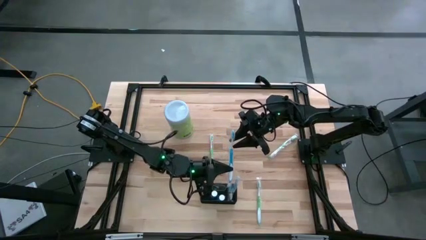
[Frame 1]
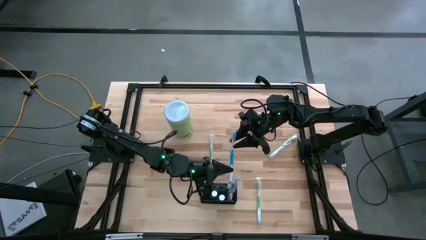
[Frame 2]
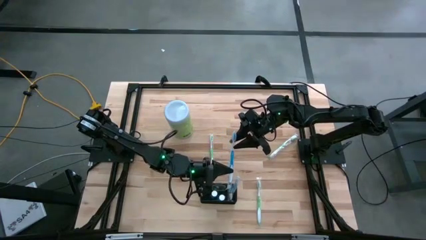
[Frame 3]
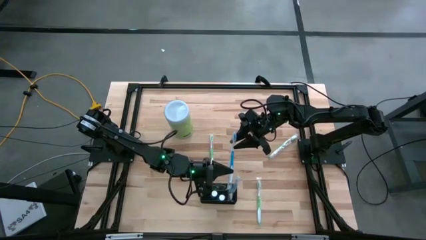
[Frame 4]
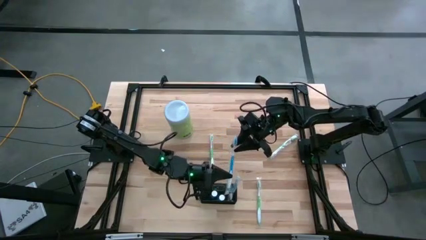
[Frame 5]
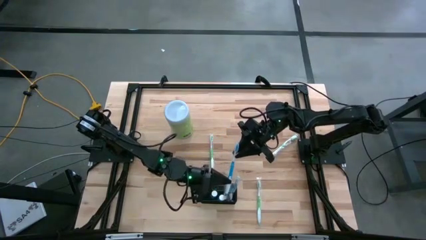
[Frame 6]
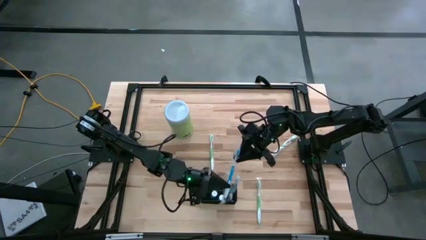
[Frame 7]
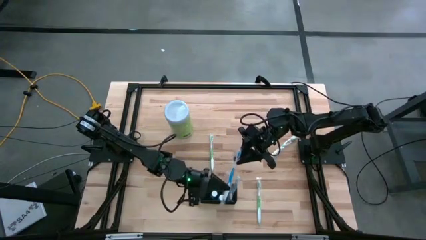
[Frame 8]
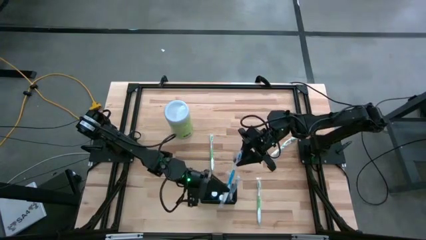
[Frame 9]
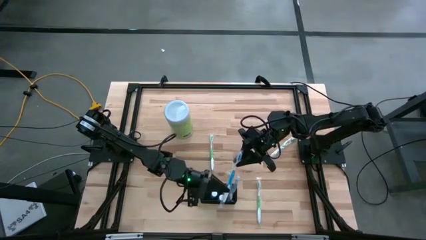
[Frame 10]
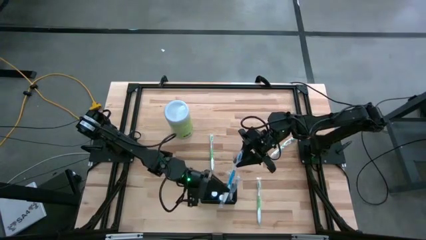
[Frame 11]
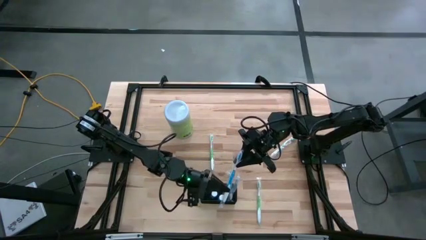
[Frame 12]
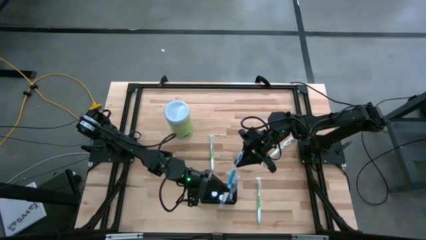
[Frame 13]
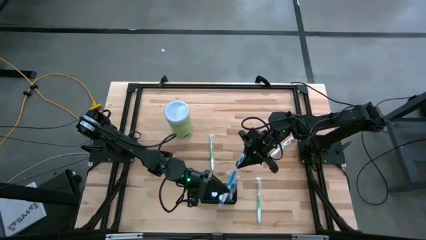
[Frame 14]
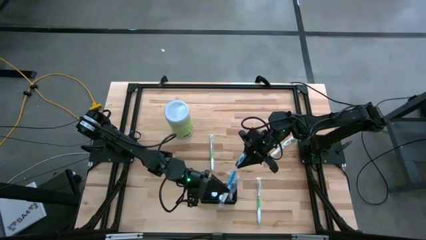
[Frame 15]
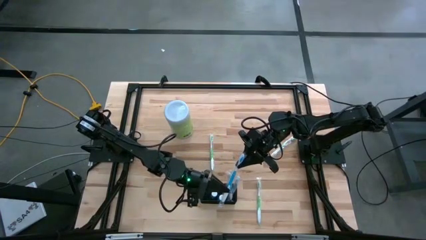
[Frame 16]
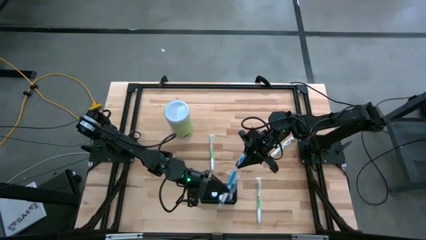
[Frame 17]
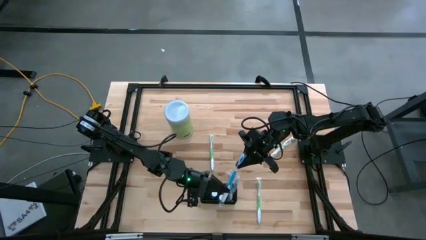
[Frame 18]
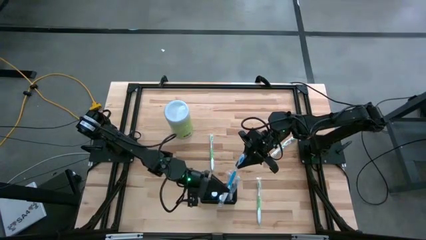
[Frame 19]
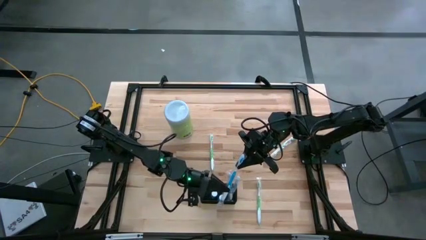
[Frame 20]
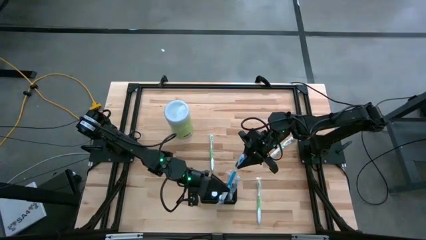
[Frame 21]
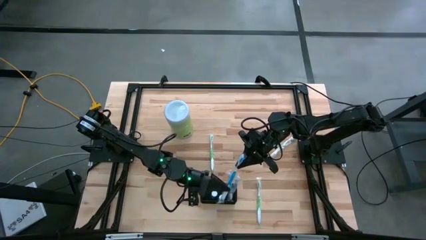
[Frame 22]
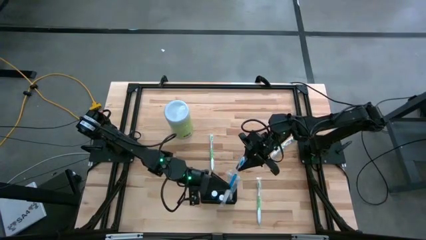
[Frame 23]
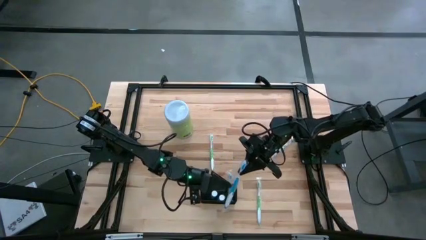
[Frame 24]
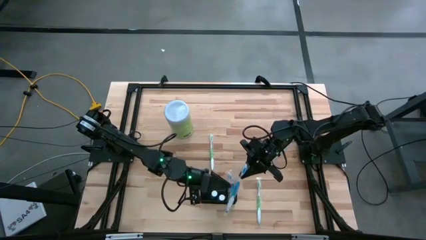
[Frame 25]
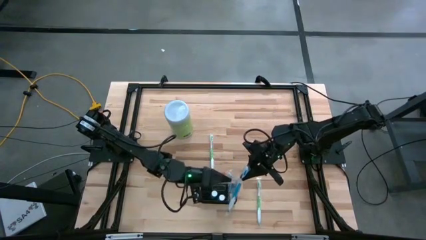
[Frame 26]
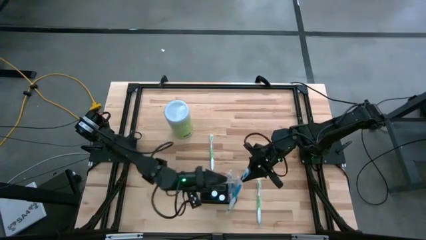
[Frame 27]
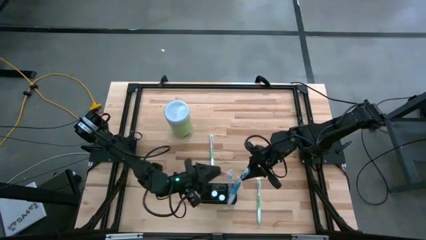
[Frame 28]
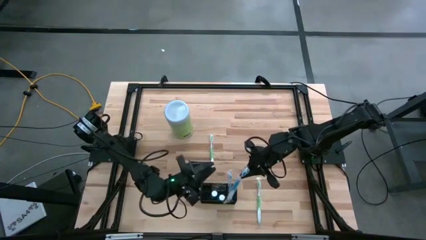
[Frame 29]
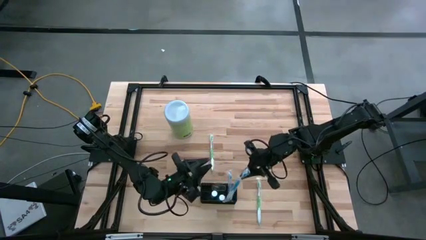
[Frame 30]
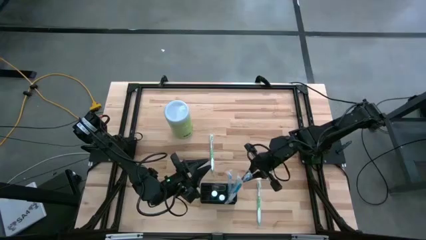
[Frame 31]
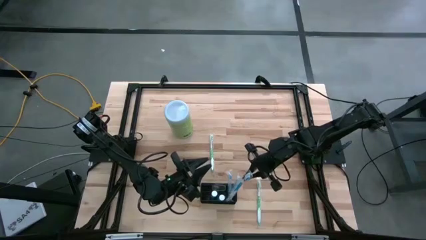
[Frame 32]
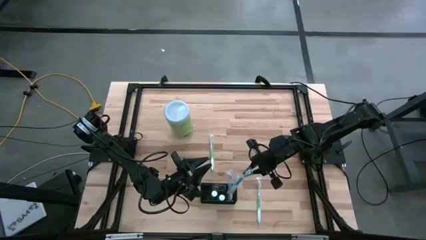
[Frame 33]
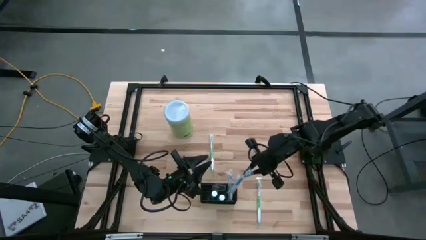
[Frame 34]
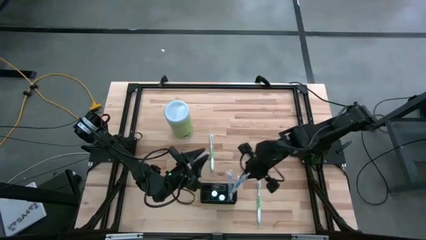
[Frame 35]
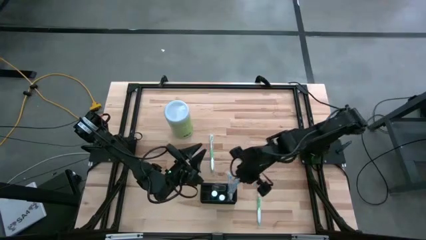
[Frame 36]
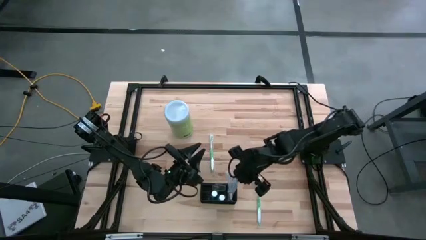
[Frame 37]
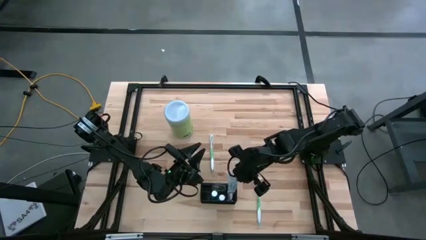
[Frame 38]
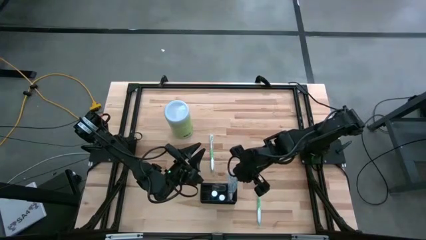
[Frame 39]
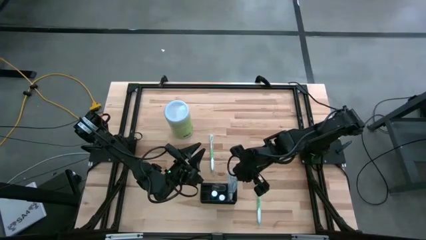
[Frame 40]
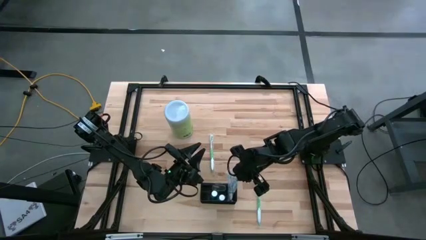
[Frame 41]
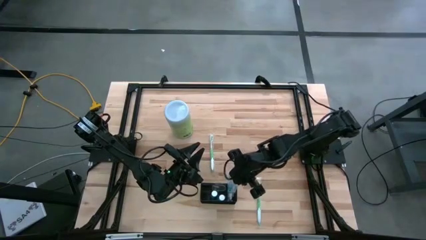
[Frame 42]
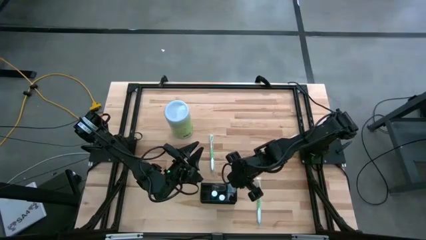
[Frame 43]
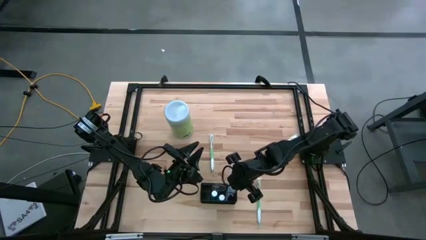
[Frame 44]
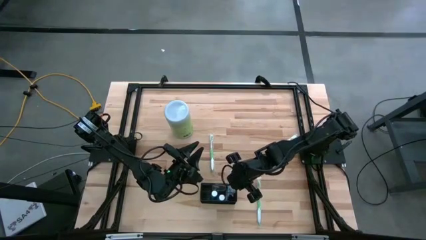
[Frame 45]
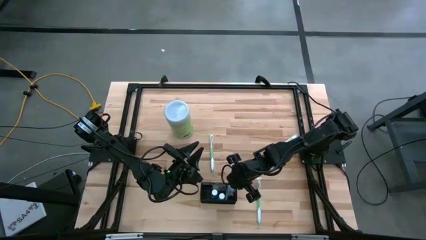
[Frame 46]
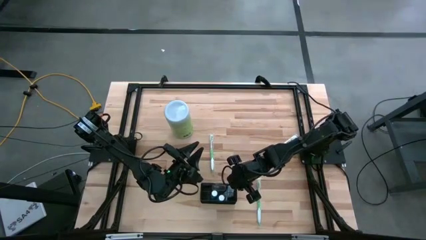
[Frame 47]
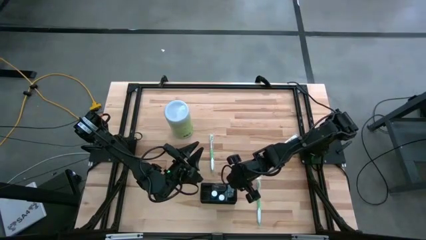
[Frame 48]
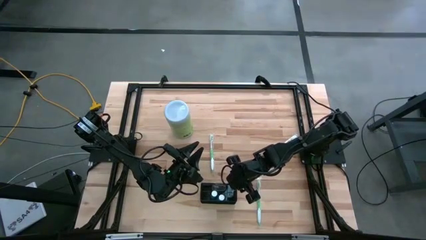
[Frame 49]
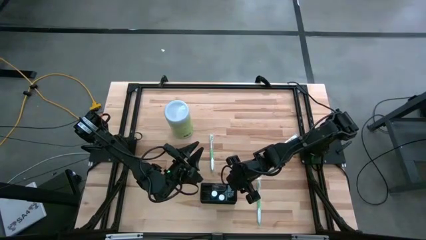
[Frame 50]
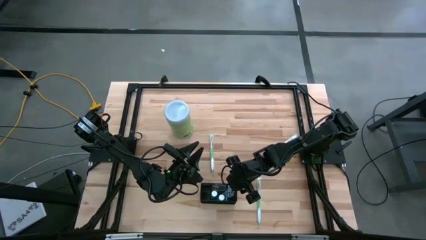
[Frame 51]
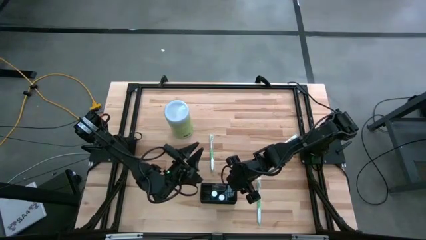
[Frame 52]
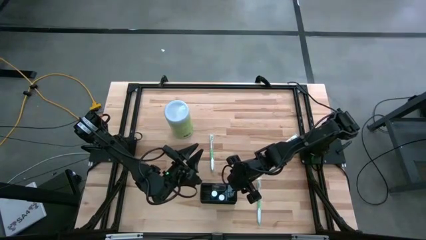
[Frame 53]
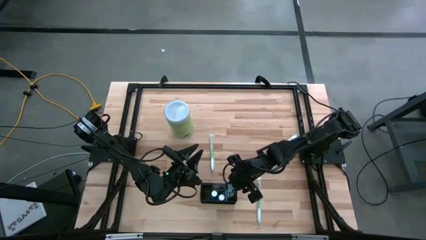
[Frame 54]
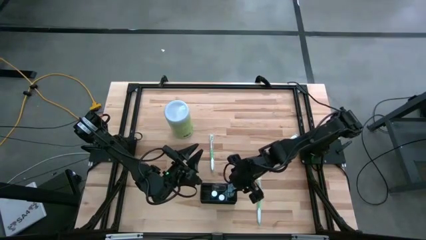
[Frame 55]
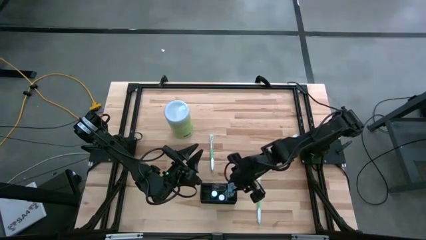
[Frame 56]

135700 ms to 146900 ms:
Task: Pick & Place toothbrushing station
Put the blue toothbrush into the mesh organizer
